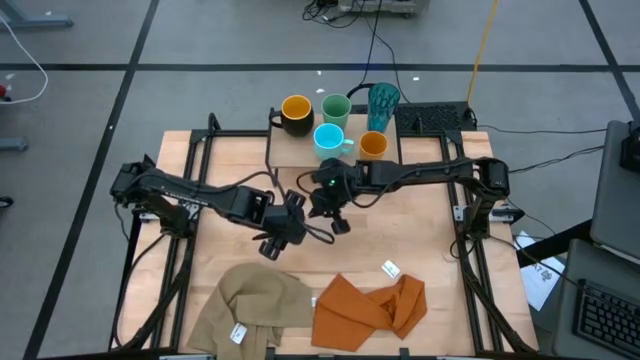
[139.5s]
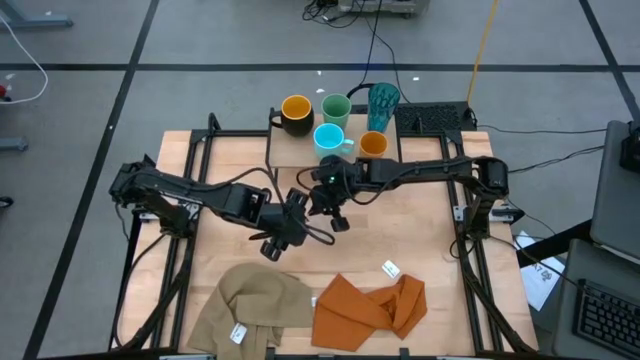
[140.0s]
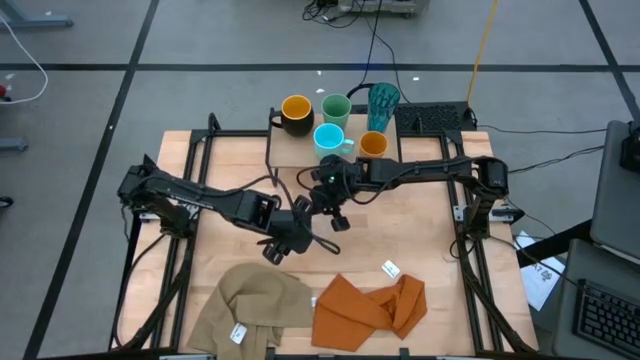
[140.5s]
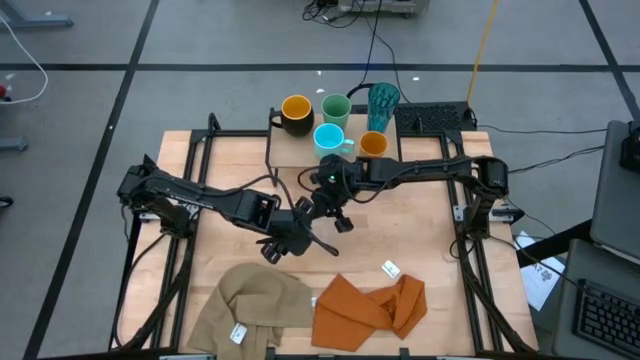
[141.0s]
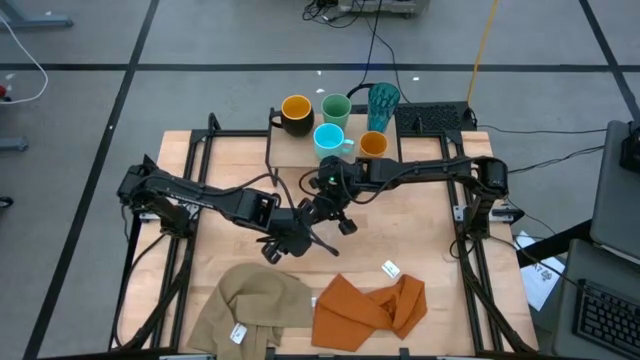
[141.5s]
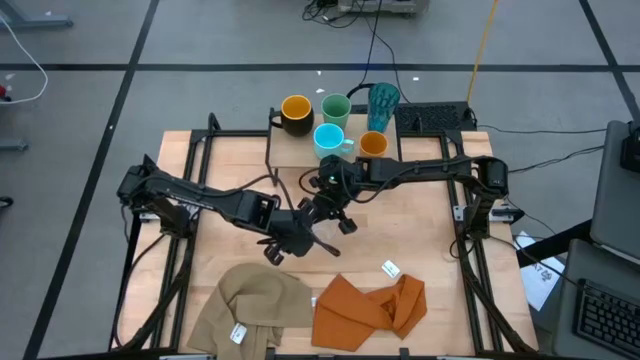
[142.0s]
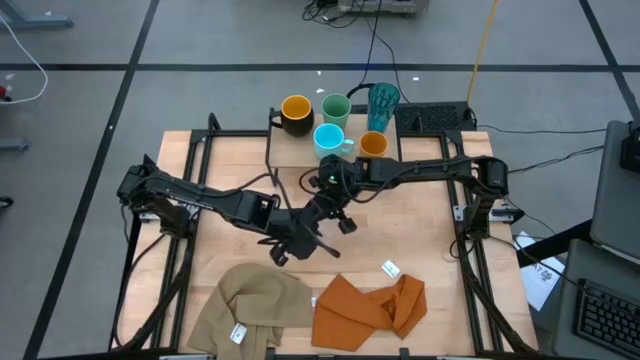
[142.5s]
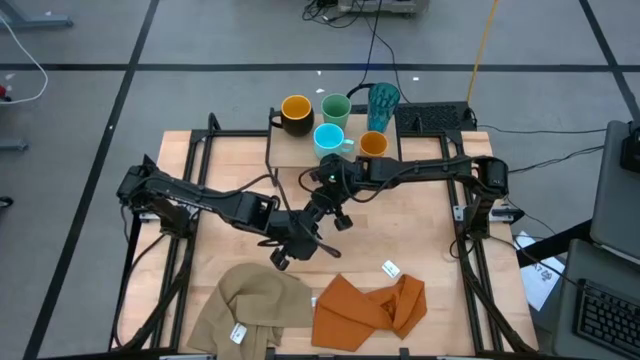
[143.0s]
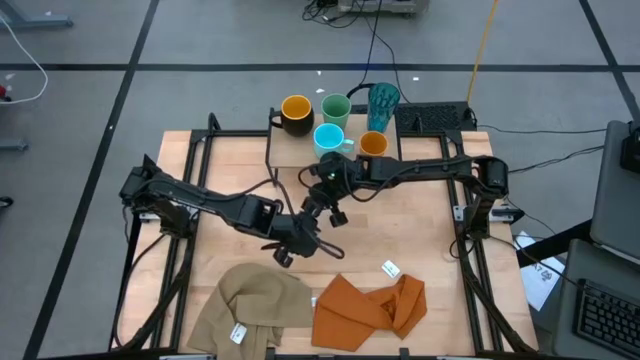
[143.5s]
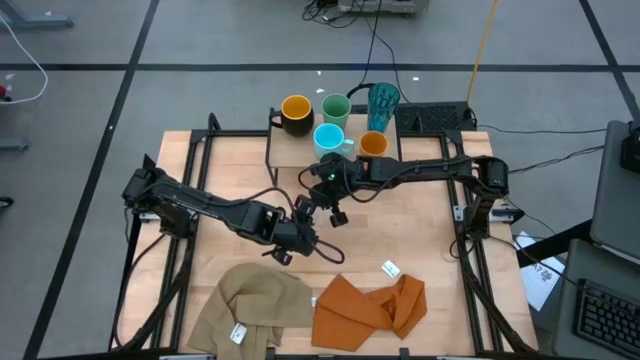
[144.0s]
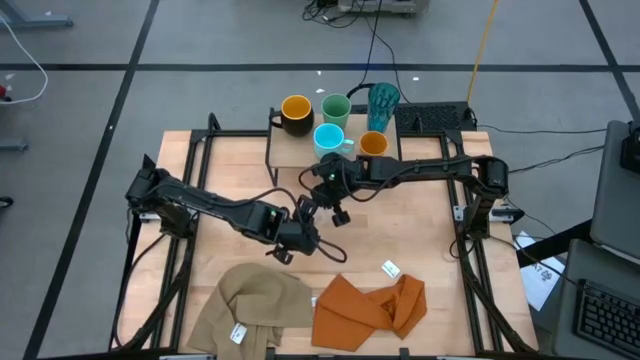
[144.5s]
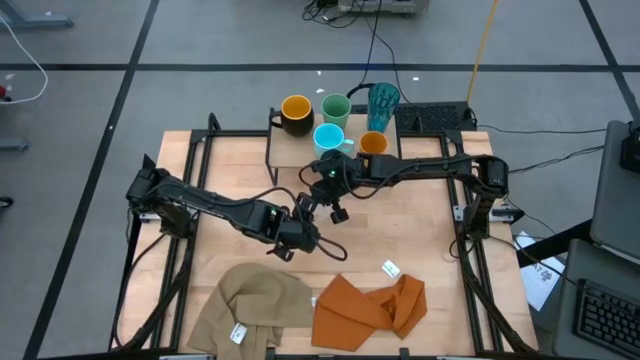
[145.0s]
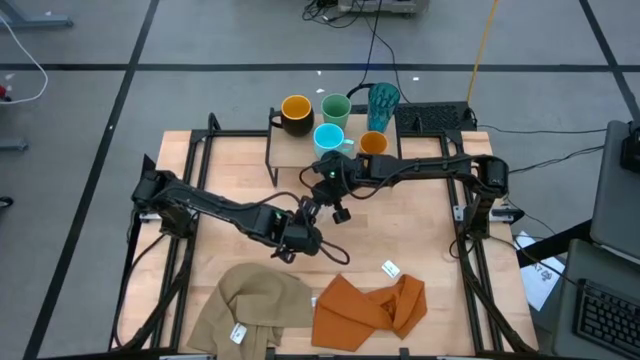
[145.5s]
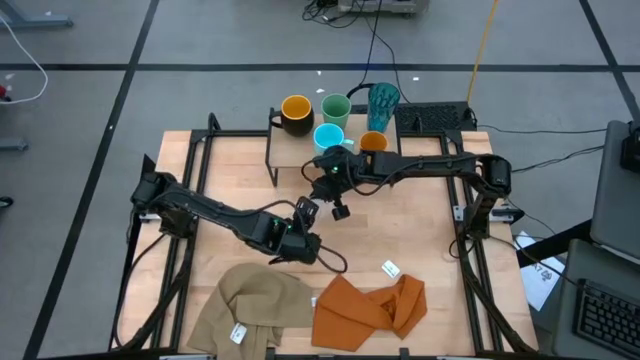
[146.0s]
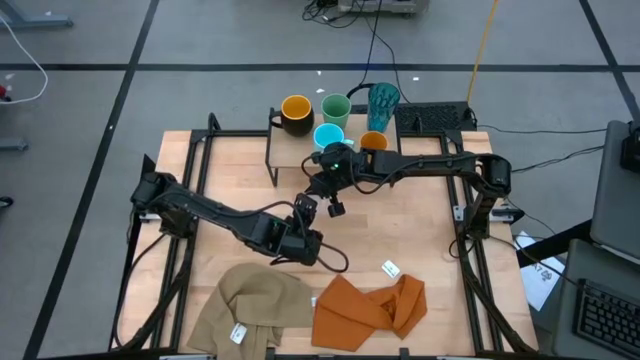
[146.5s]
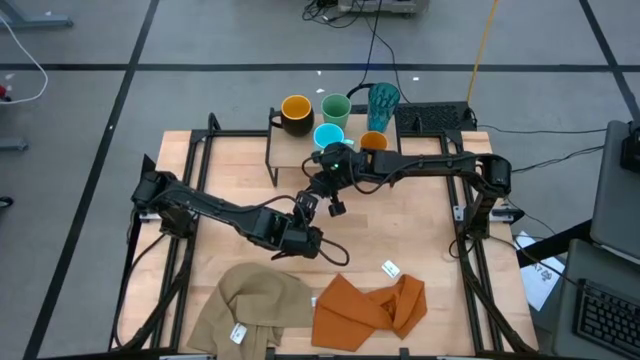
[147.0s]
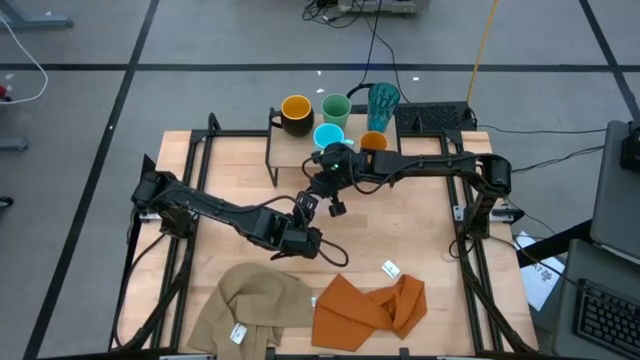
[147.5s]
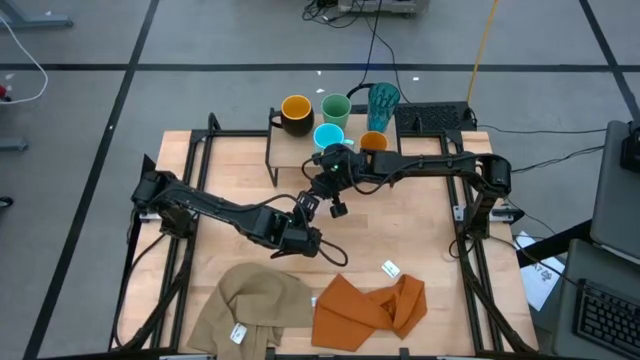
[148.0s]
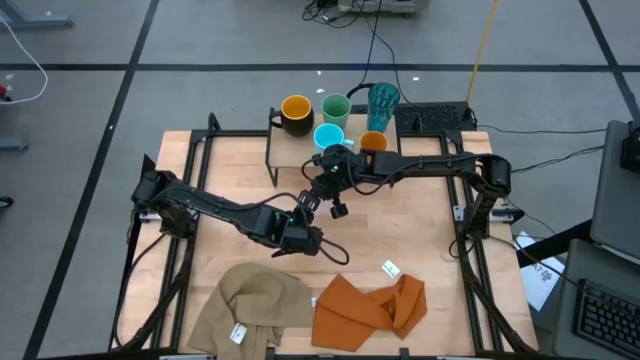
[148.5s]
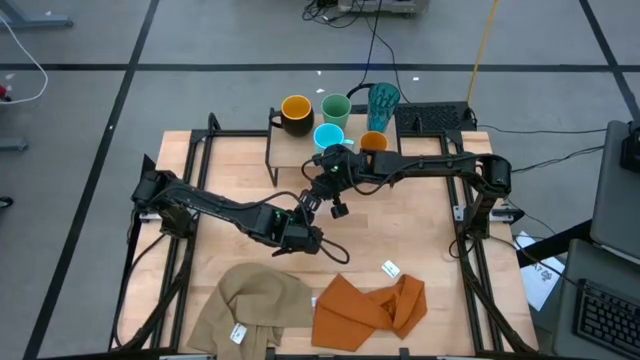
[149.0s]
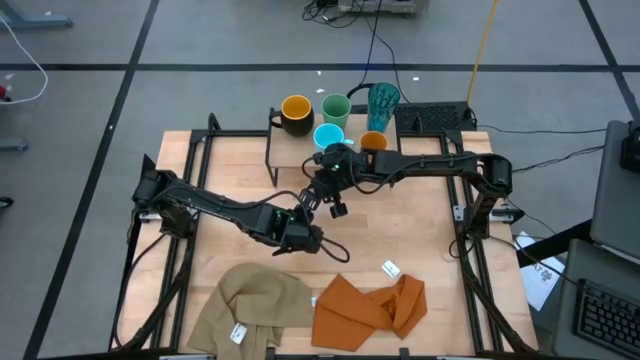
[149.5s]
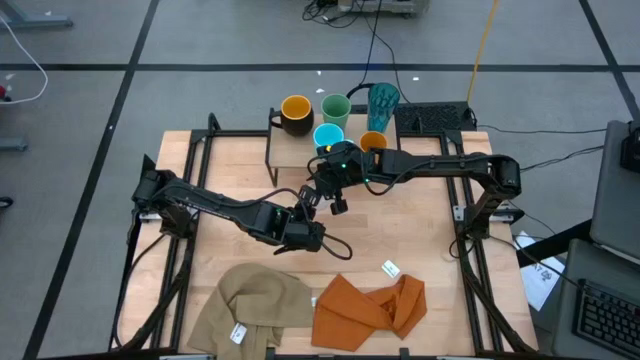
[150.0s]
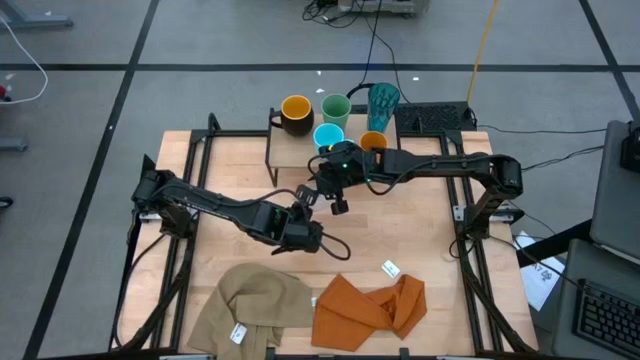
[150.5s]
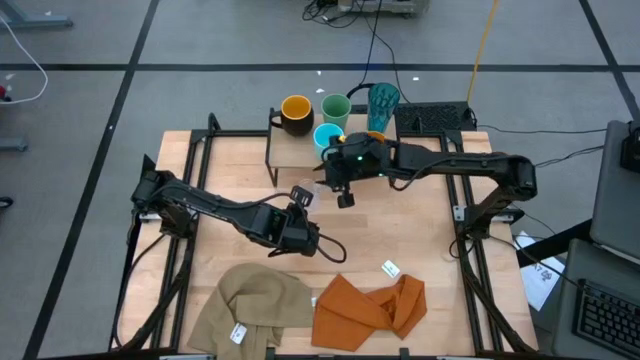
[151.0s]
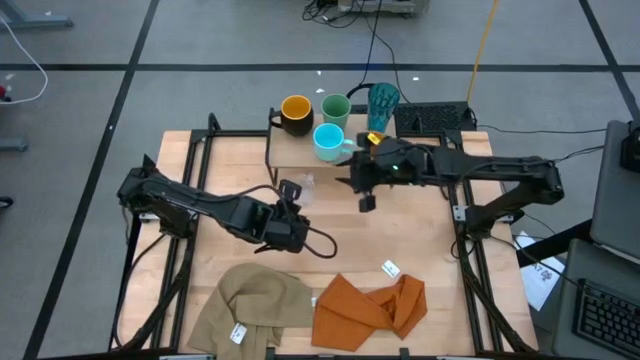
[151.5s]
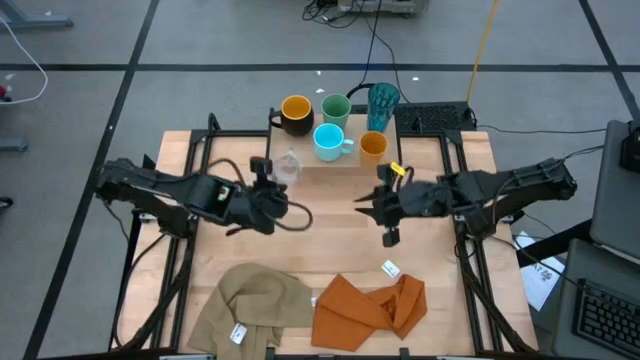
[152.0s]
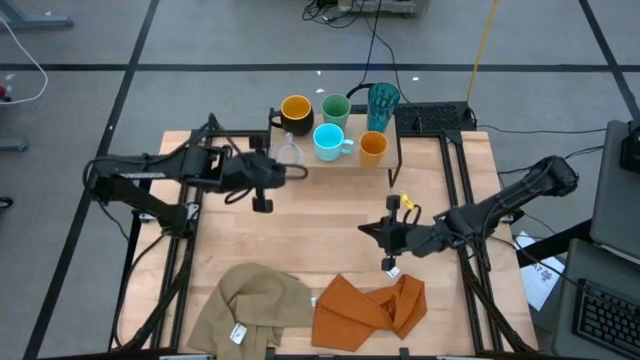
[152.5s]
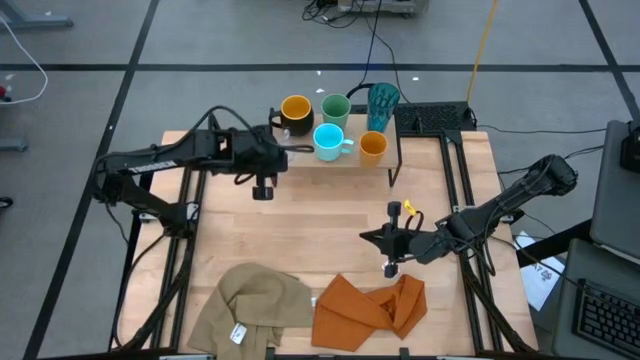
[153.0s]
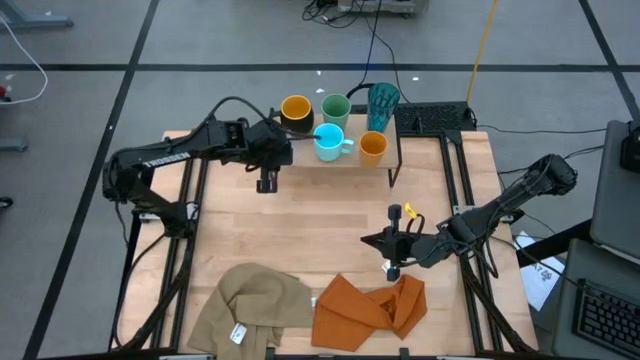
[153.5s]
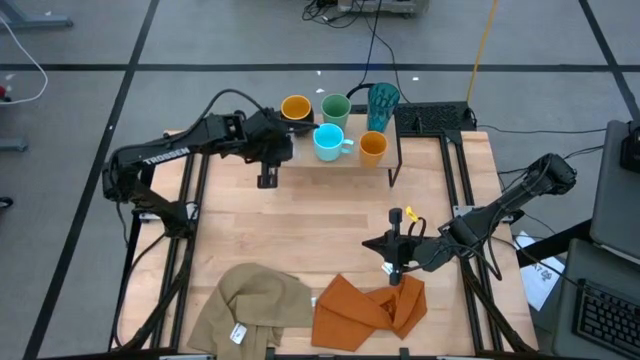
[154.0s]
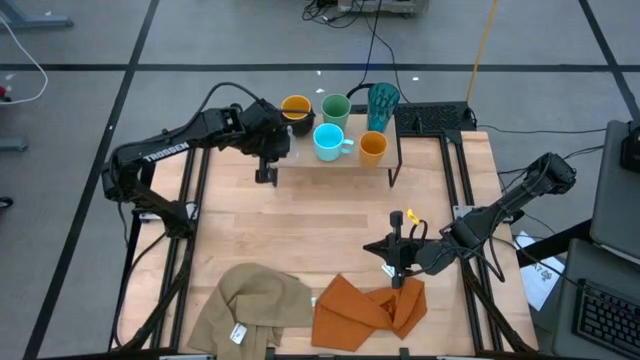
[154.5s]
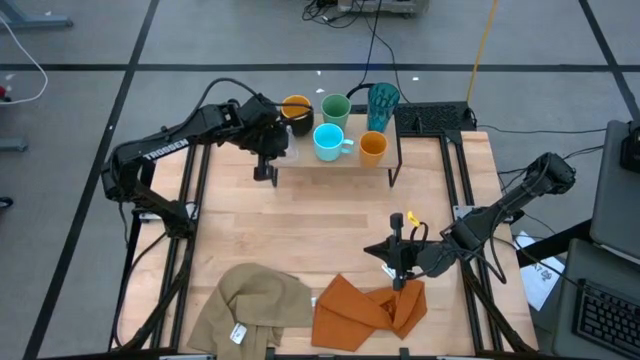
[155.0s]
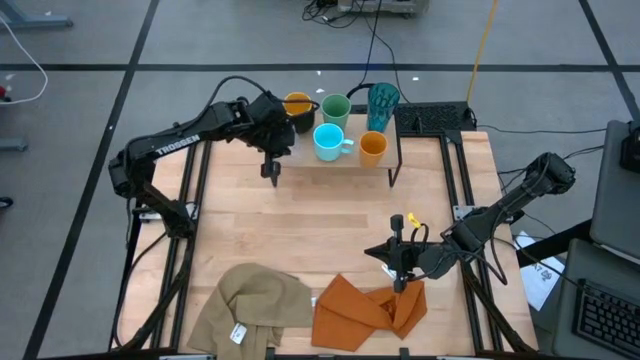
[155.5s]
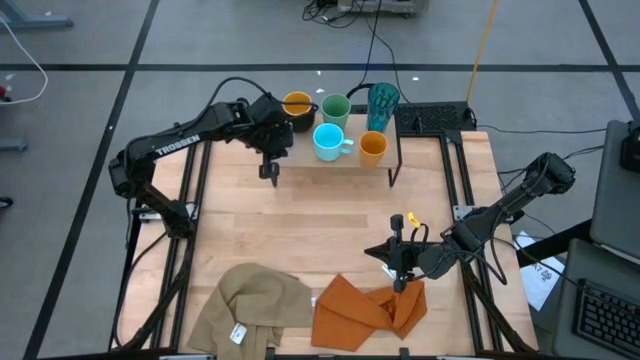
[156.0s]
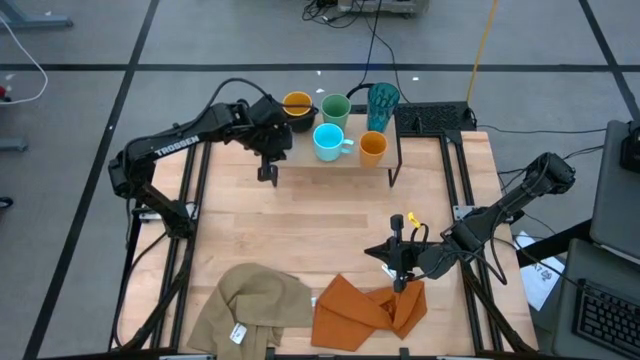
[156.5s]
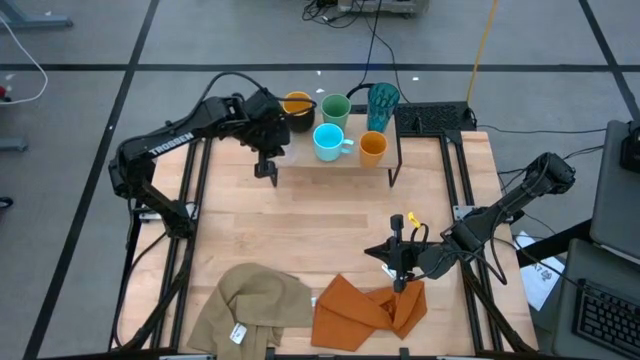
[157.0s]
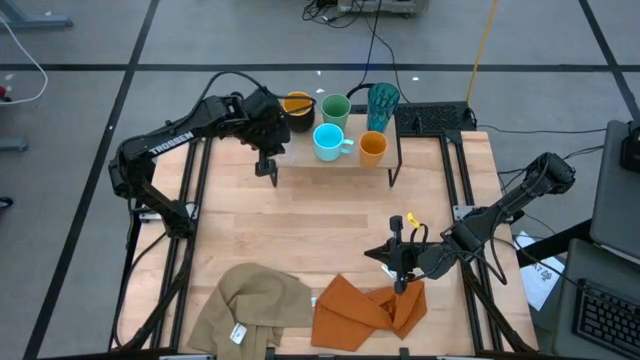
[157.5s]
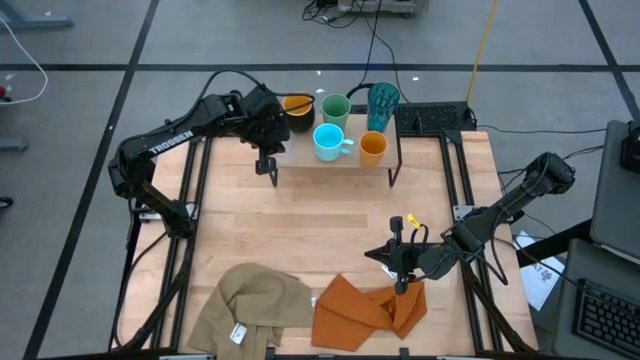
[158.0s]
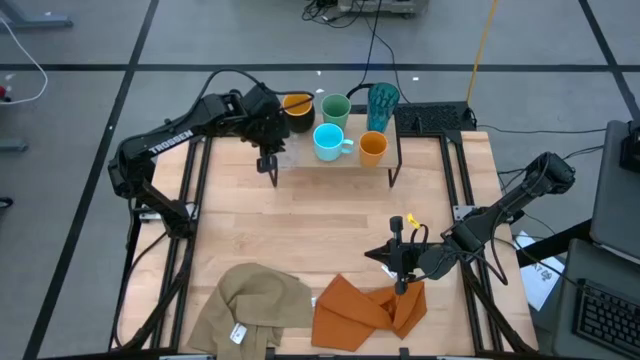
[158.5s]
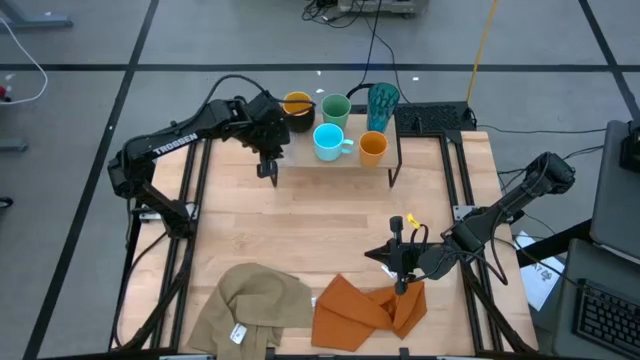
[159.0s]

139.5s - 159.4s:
Task: Stack small to large cups/mugs on shelf
Put the transparent mug on the shelf

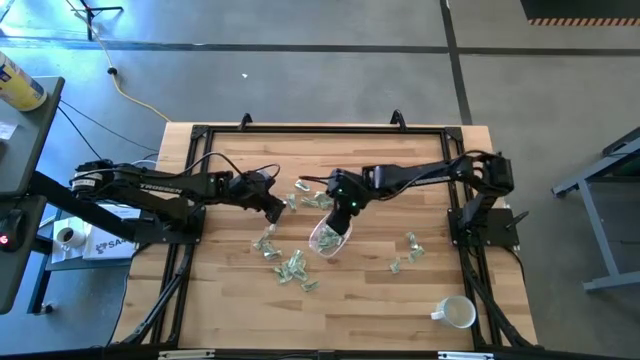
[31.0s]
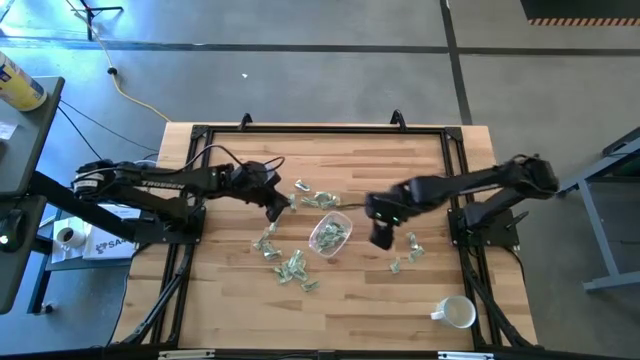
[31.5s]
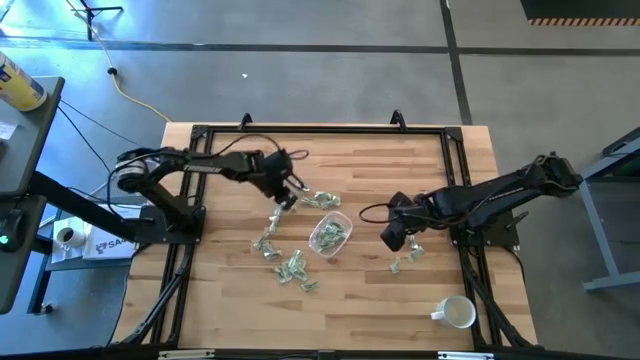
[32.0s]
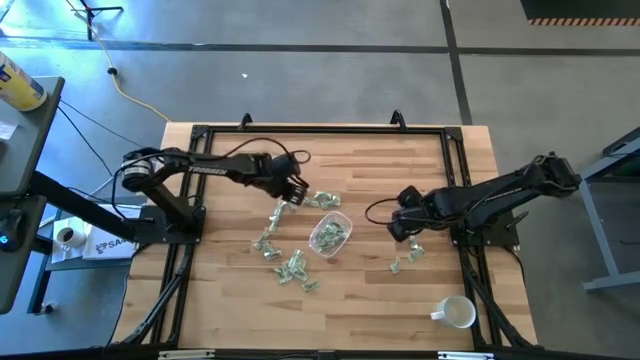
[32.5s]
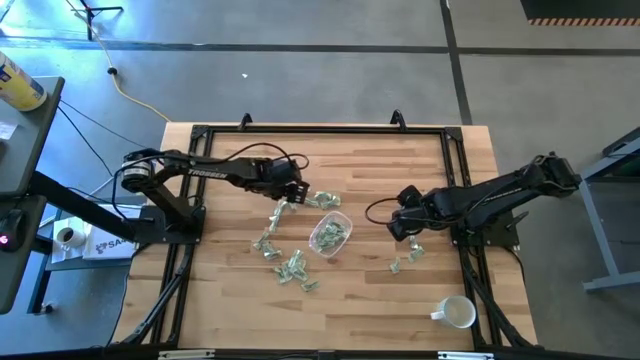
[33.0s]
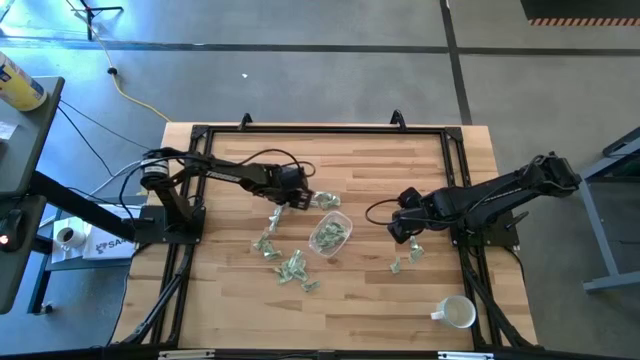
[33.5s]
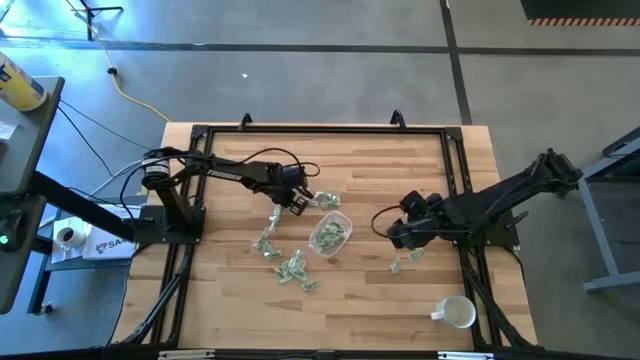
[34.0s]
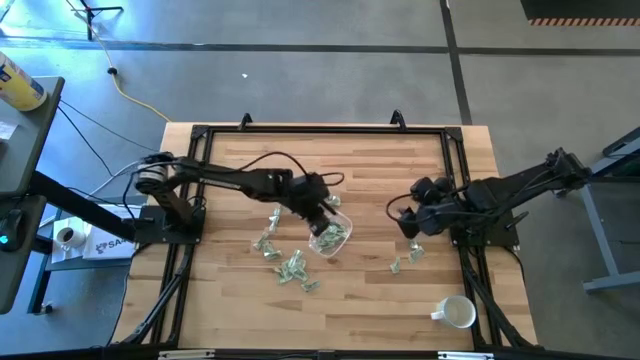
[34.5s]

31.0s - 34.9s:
Task: Pick and place Stevia / Truvia into bins
Put the stevia packet into the transparent bin
